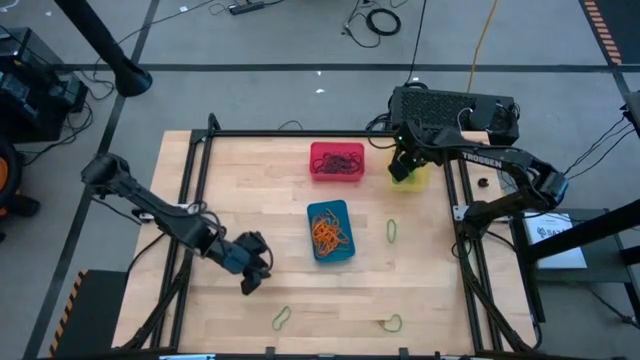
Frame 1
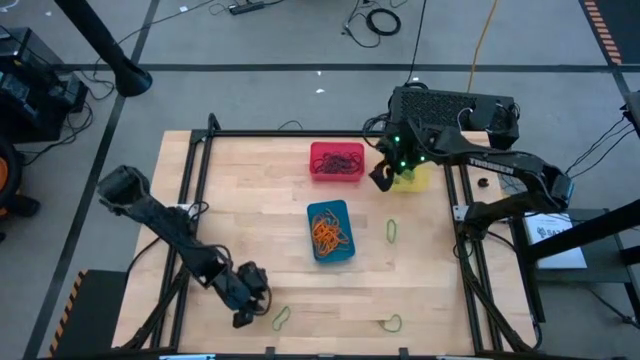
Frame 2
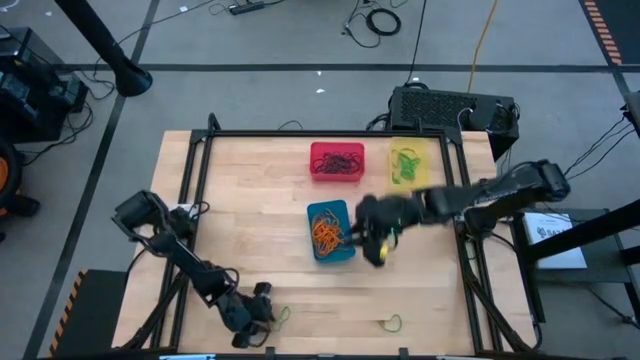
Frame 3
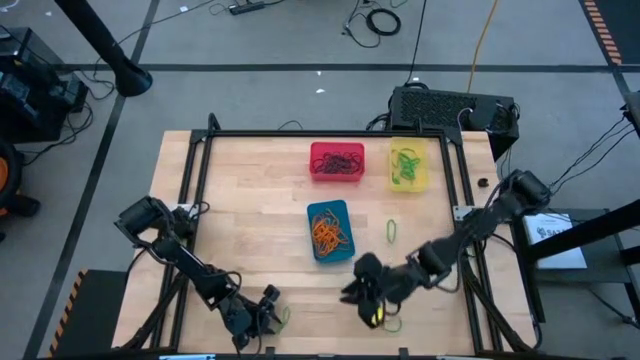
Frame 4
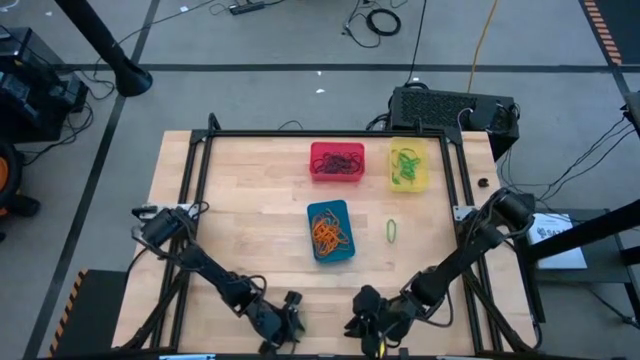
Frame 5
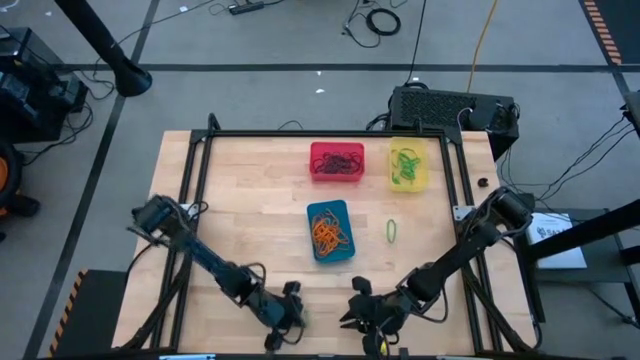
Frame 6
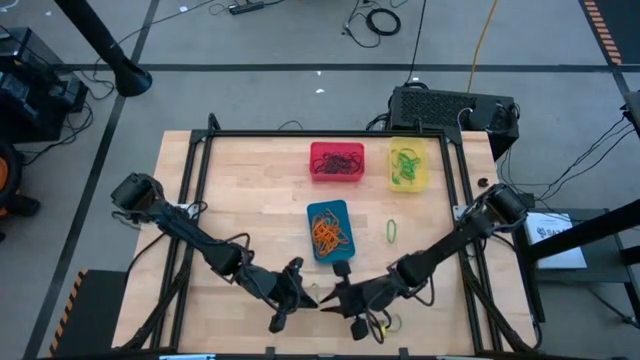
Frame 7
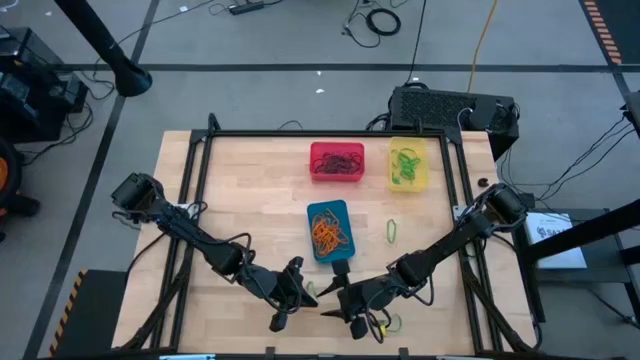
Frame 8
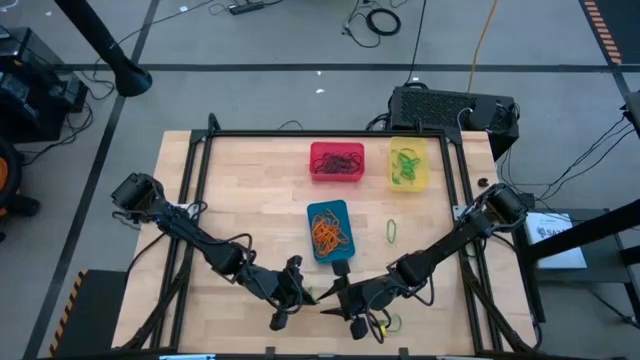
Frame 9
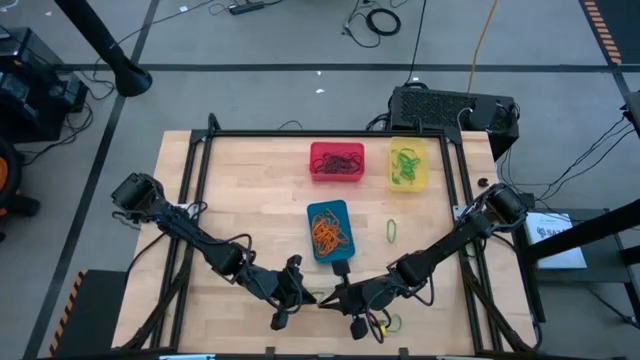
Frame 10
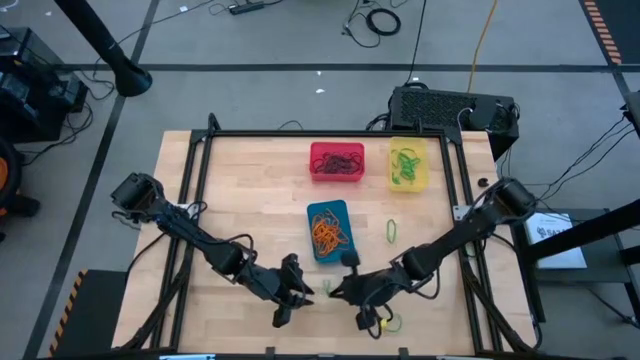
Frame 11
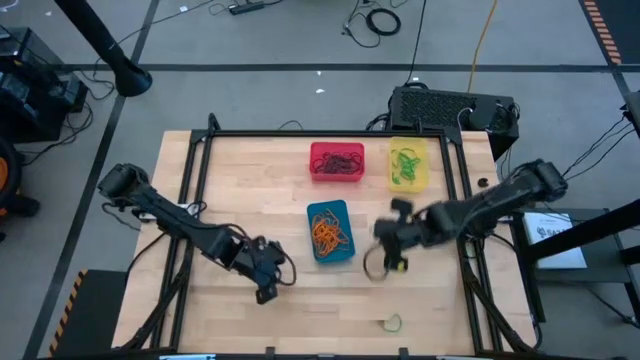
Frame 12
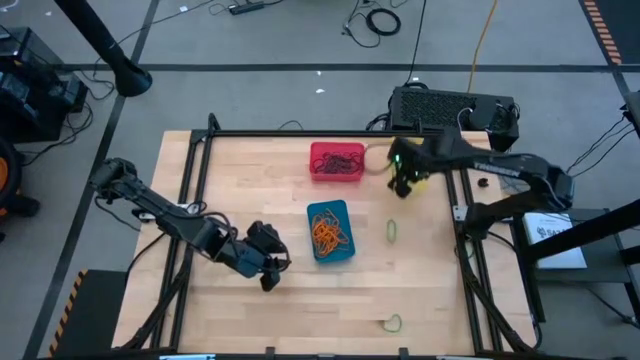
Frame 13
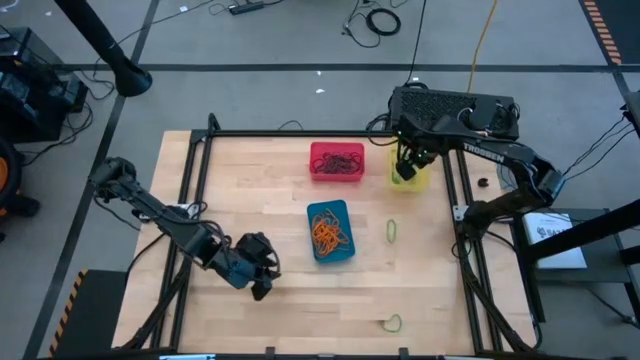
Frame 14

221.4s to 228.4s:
Task: Sort rubber bands into baskets
Put the green rubber band into the yellow bin

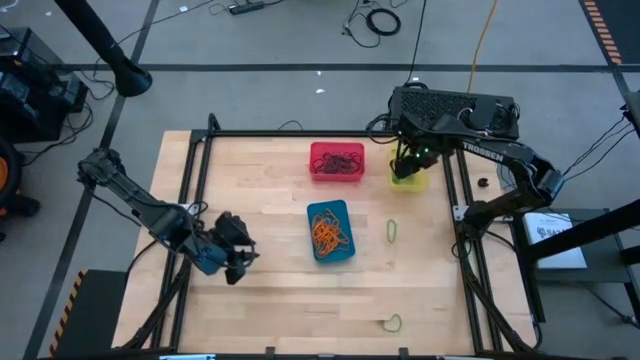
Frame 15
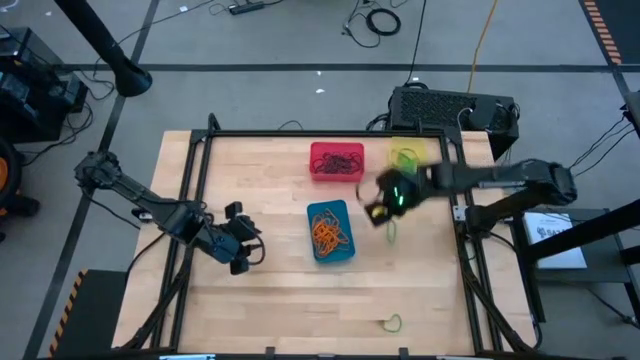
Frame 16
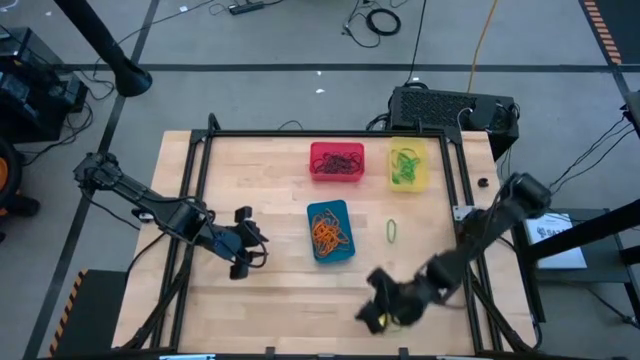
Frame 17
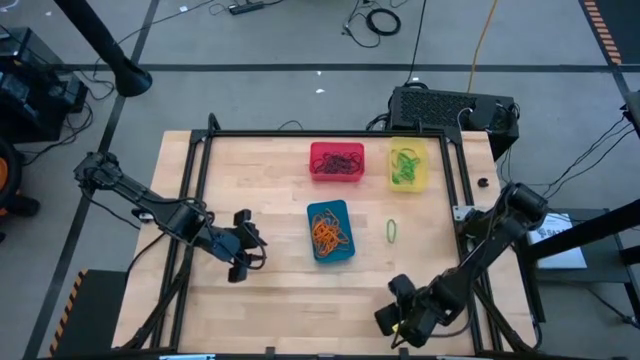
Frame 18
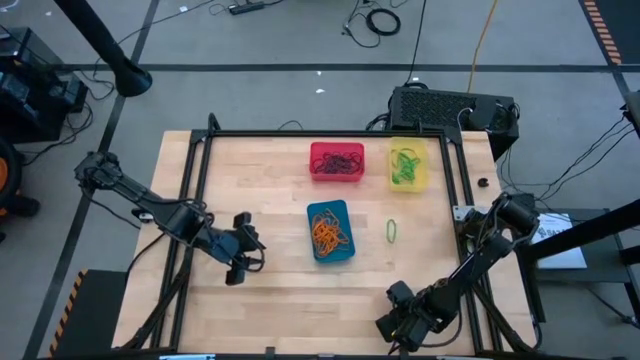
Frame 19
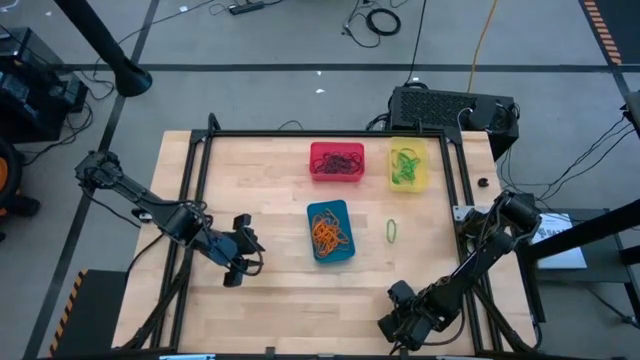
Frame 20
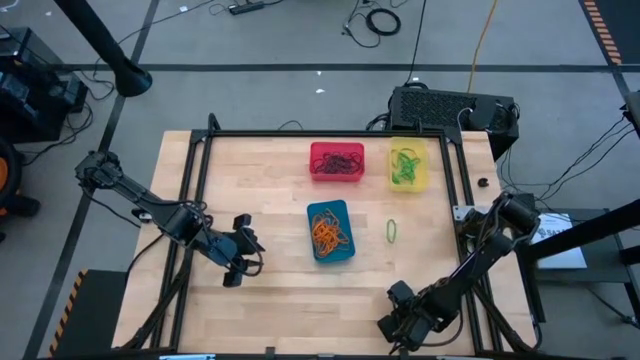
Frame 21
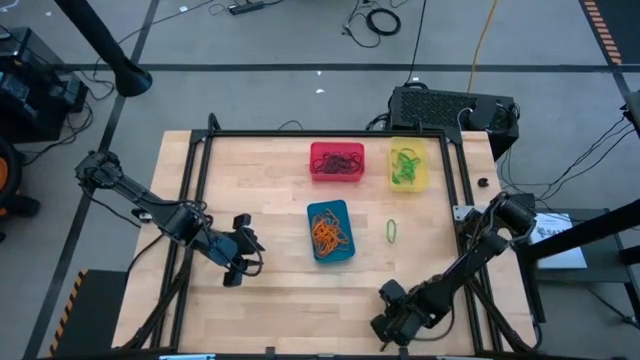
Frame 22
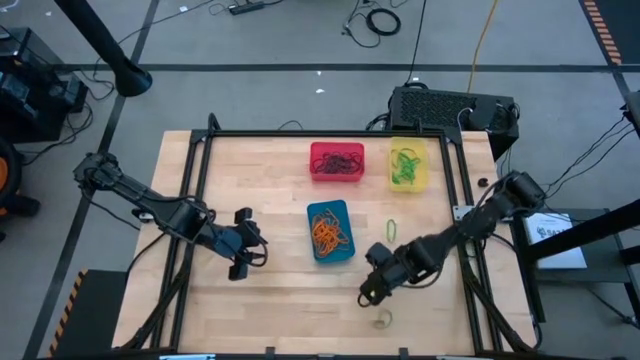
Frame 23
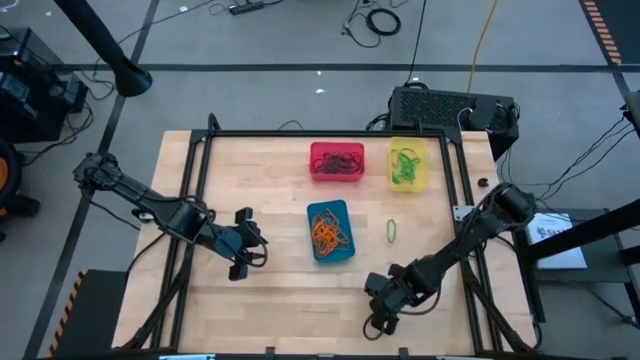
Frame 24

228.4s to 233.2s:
Put the green rubber band into the yellow bin

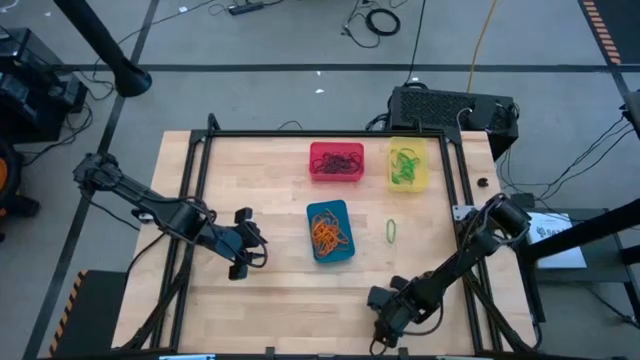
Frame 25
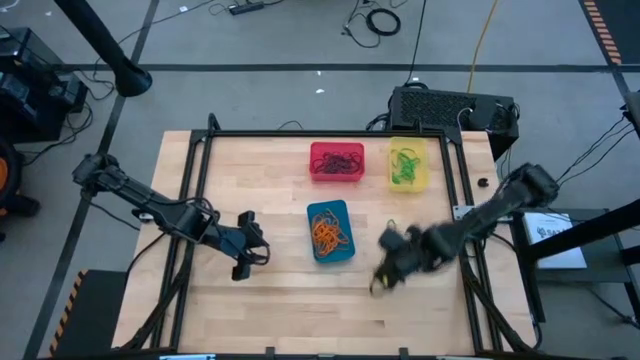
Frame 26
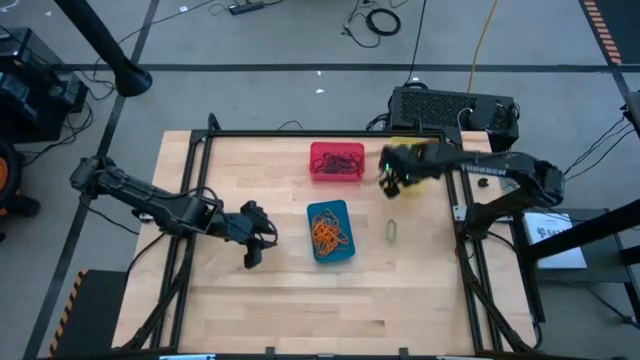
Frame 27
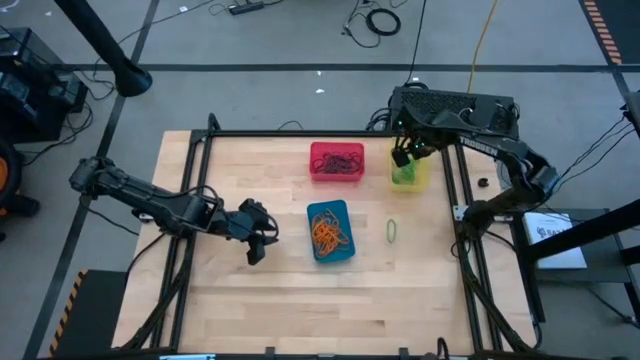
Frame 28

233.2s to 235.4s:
Put the green rubber band into the yellow bin

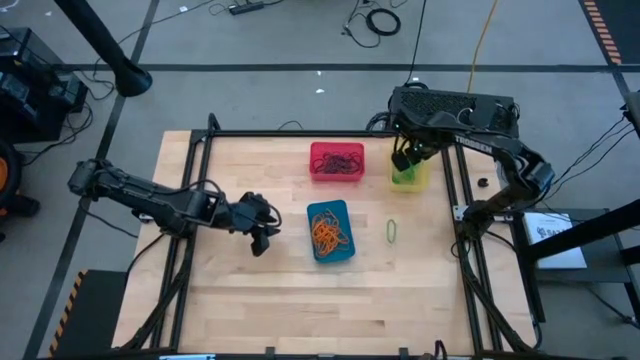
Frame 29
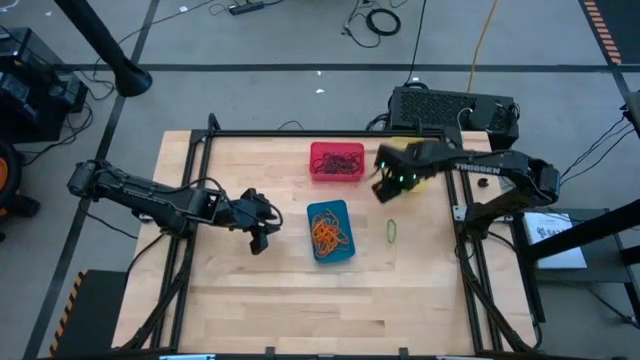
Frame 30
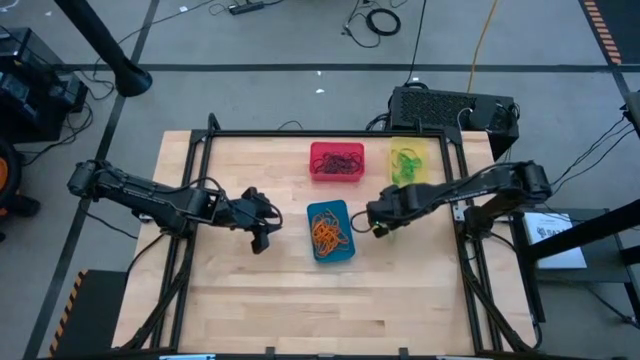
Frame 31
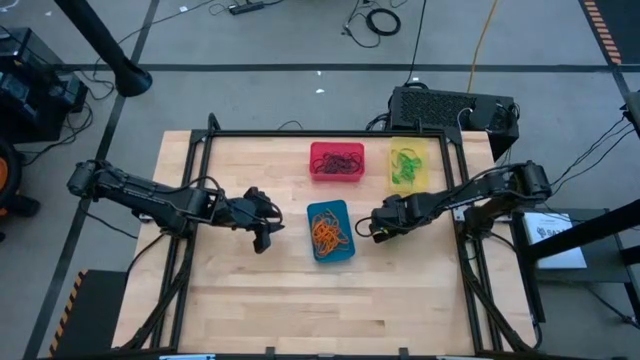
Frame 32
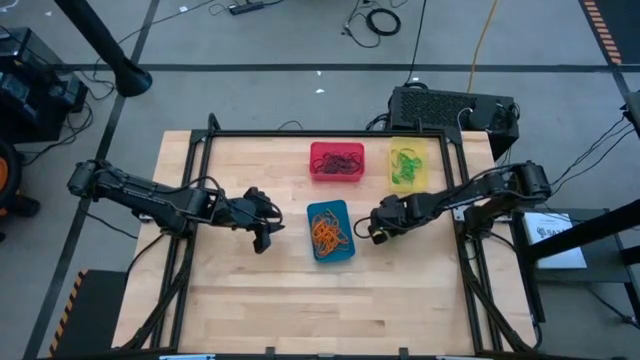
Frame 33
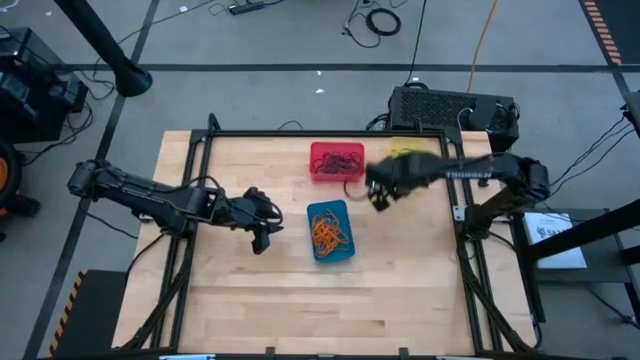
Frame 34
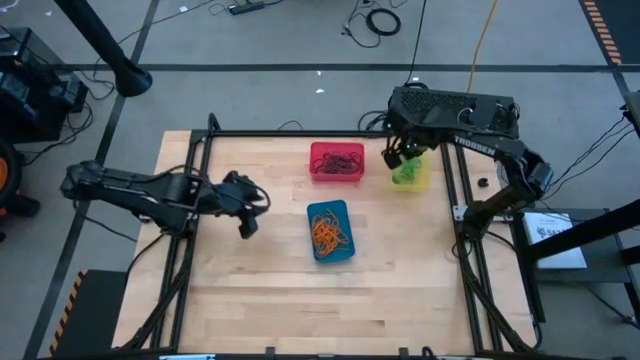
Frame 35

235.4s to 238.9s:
Put the green rubber band into the yellow bin

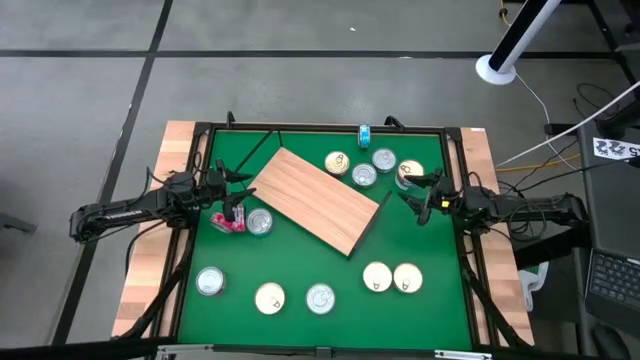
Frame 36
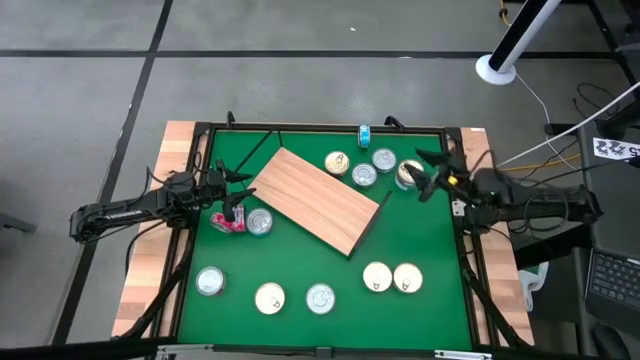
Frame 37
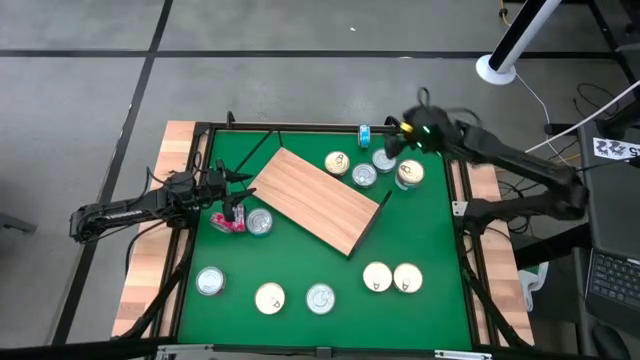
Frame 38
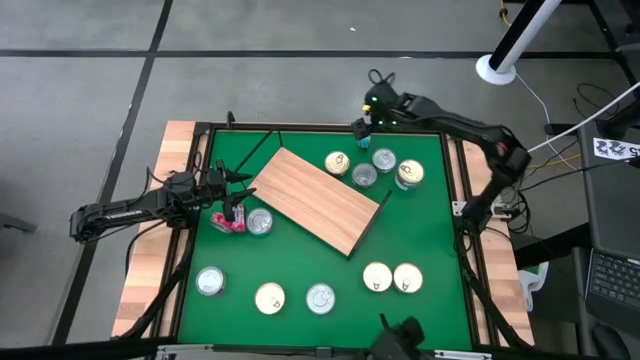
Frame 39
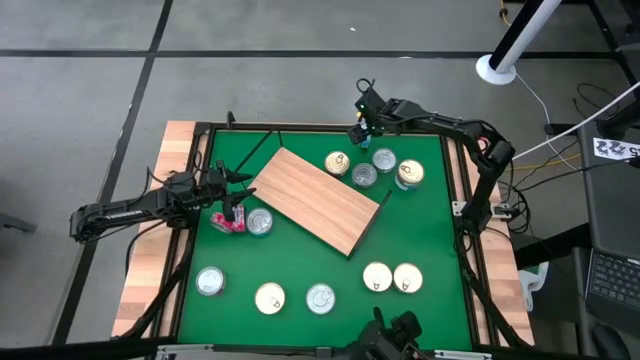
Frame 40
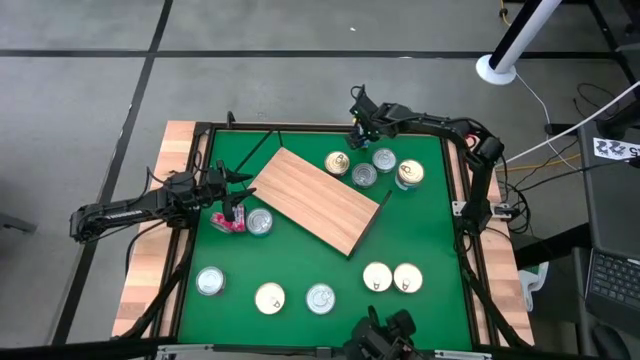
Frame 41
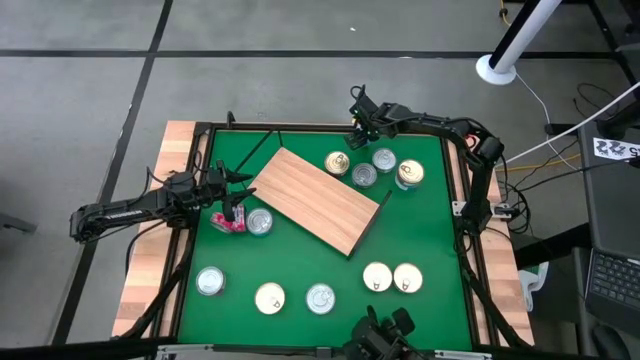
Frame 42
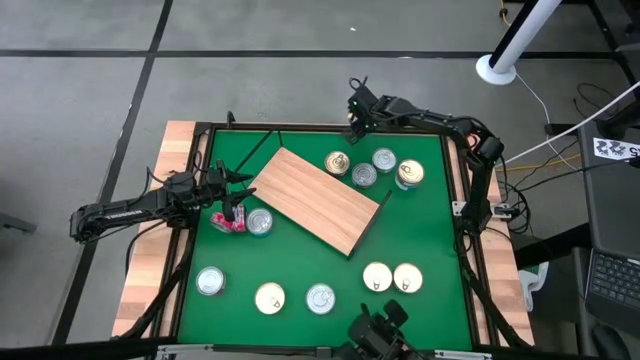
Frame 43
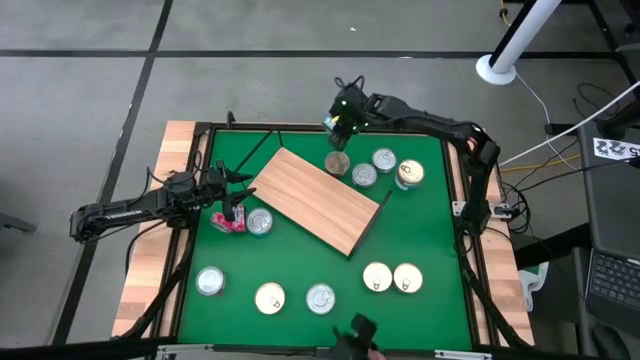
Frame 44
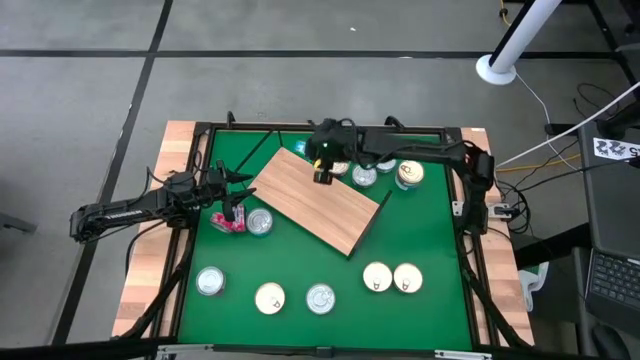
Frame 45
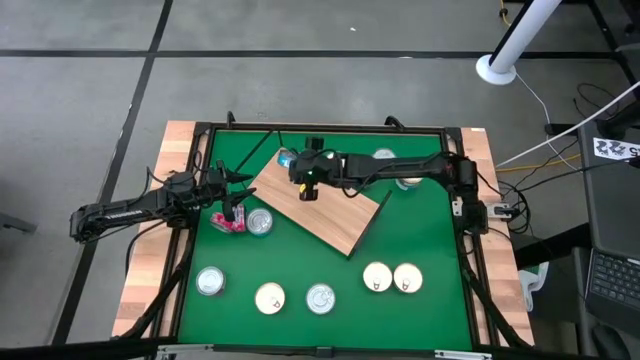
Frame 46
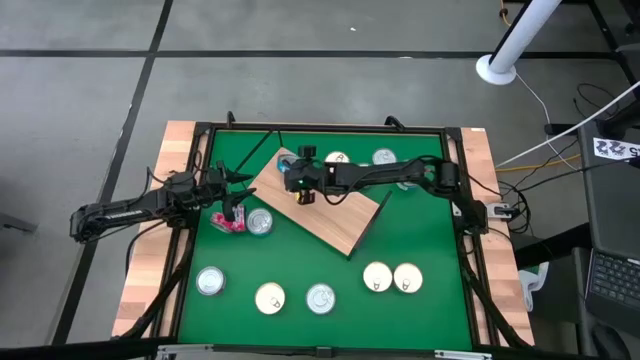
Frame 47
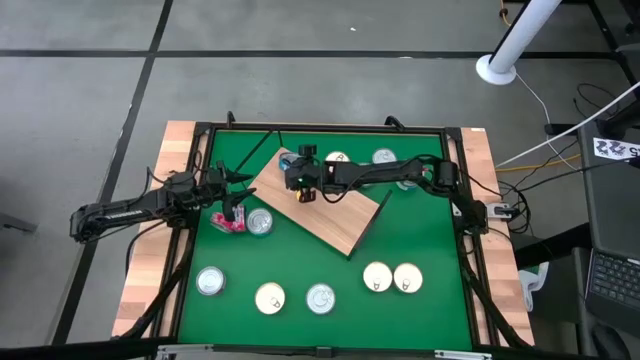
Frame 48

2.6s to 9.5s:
Task: Stack canned seafood by type on shelf
Put the yellow and blue tuna can on the shelf
